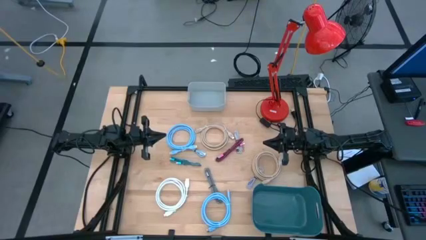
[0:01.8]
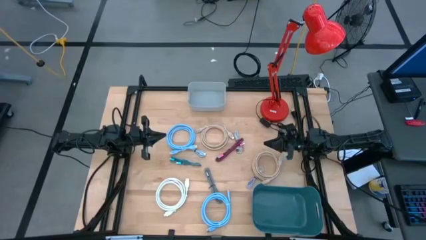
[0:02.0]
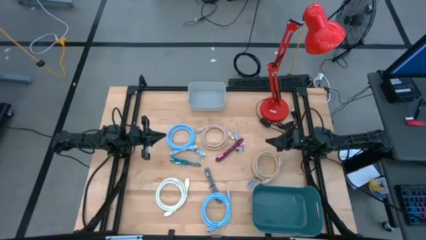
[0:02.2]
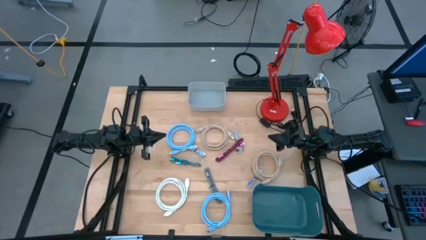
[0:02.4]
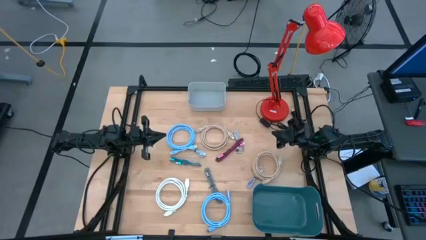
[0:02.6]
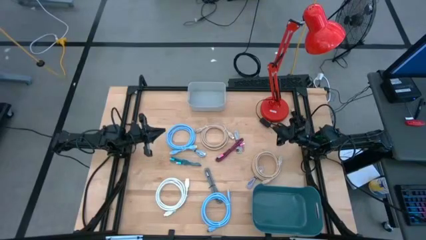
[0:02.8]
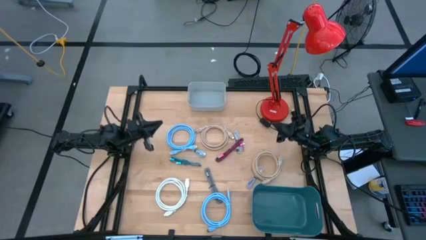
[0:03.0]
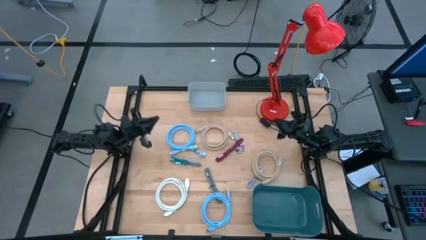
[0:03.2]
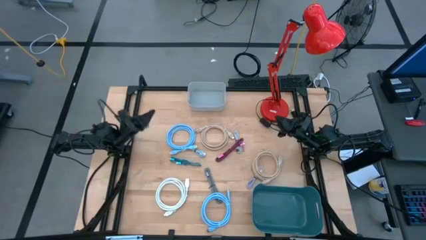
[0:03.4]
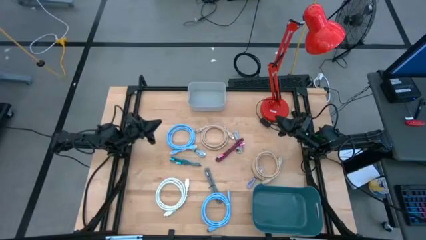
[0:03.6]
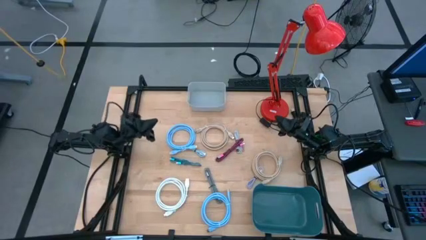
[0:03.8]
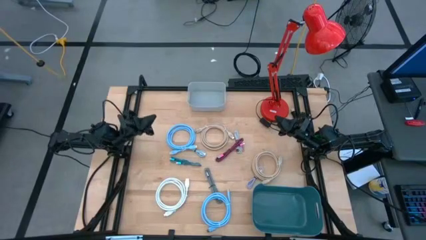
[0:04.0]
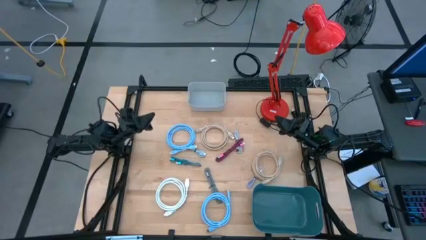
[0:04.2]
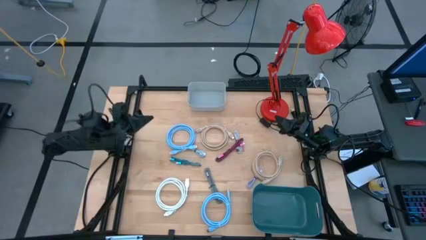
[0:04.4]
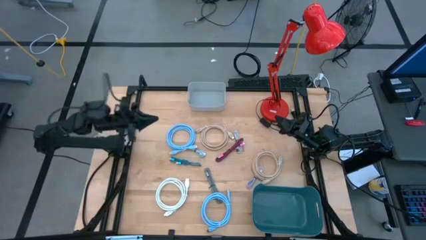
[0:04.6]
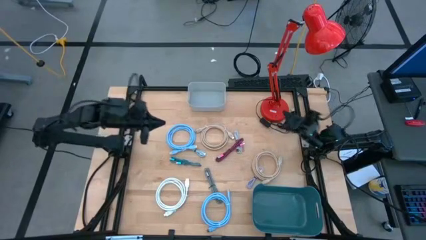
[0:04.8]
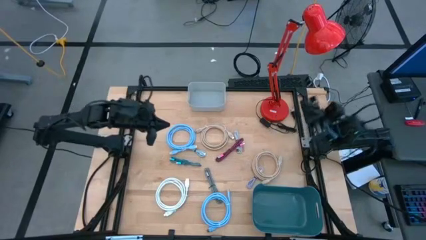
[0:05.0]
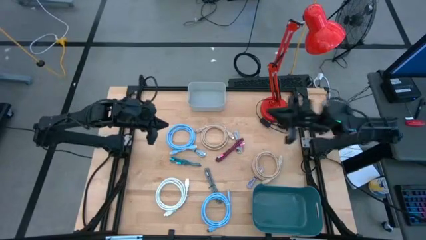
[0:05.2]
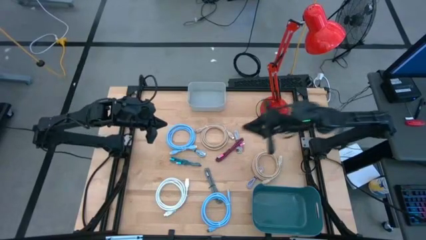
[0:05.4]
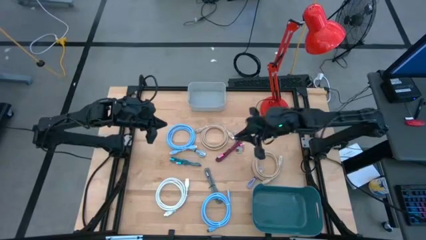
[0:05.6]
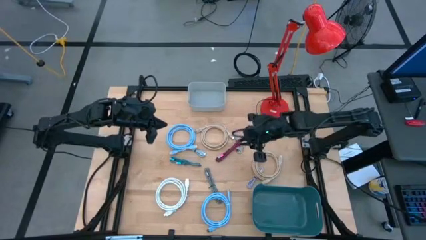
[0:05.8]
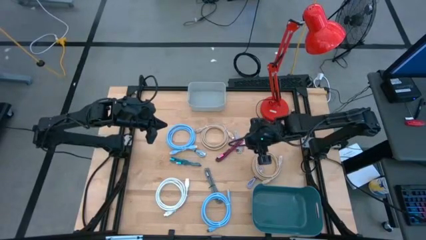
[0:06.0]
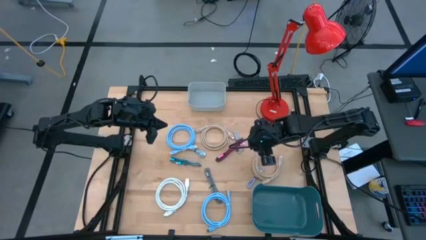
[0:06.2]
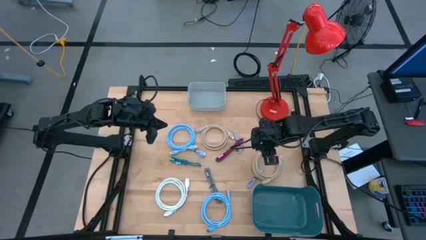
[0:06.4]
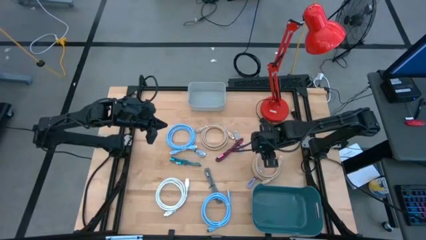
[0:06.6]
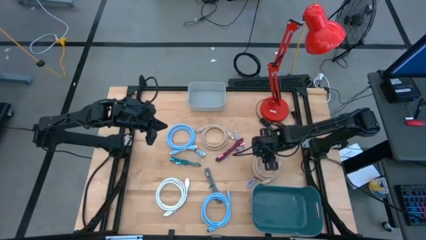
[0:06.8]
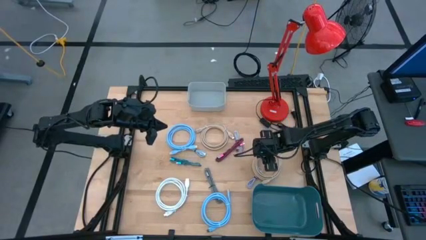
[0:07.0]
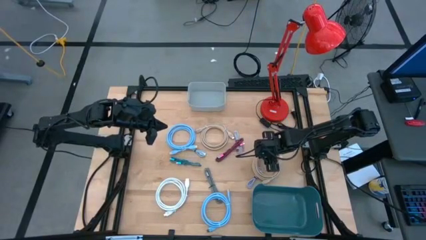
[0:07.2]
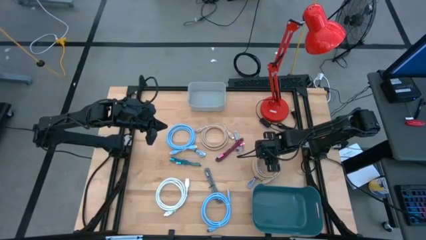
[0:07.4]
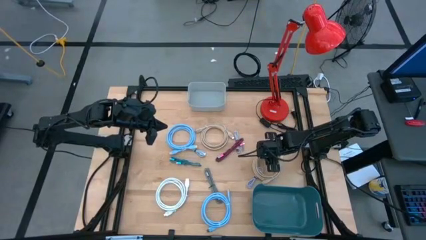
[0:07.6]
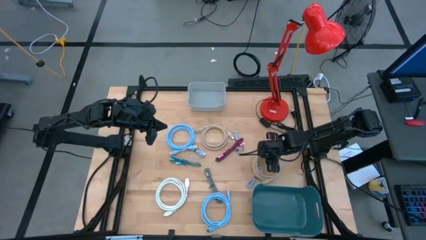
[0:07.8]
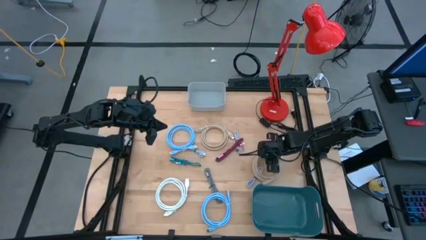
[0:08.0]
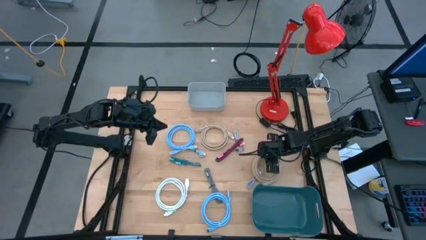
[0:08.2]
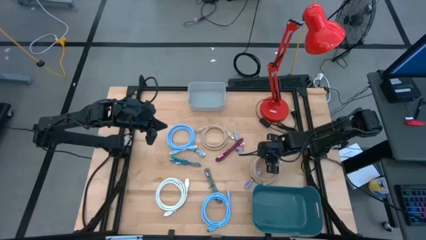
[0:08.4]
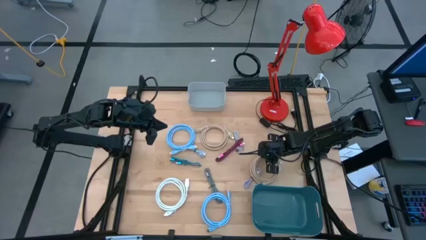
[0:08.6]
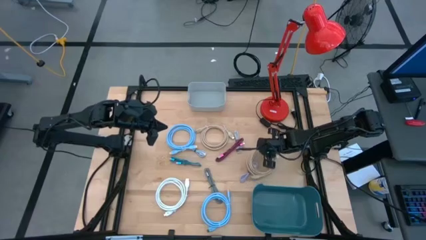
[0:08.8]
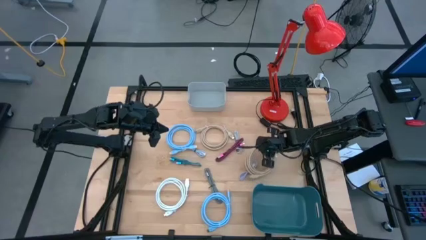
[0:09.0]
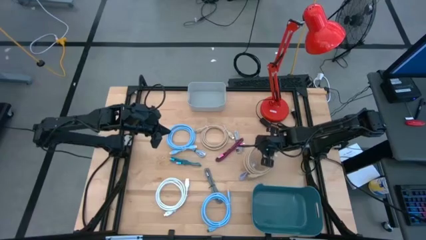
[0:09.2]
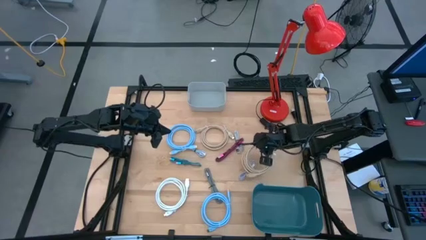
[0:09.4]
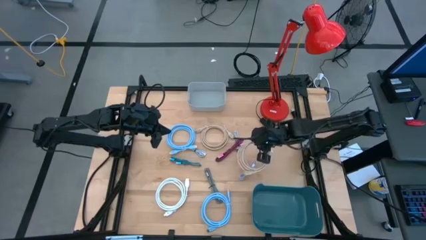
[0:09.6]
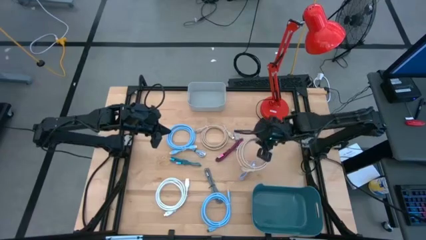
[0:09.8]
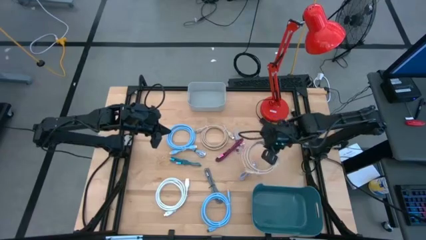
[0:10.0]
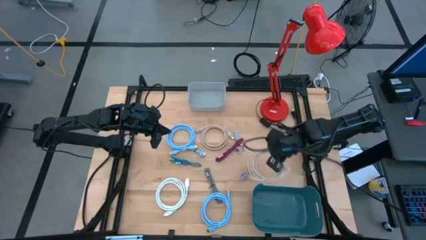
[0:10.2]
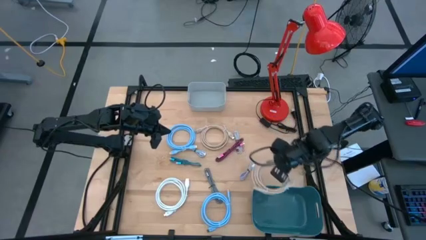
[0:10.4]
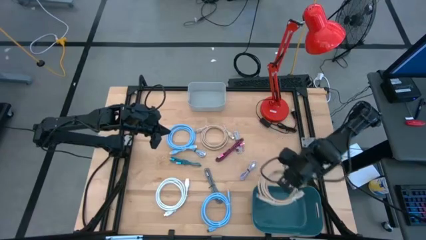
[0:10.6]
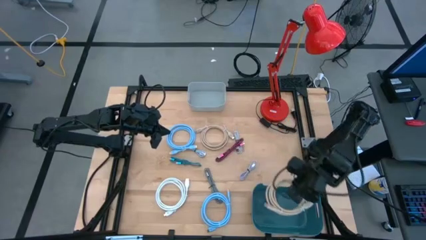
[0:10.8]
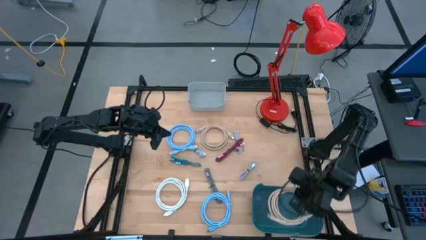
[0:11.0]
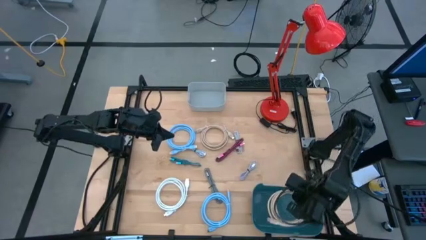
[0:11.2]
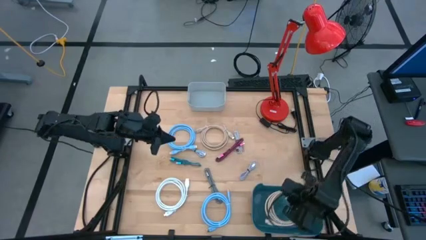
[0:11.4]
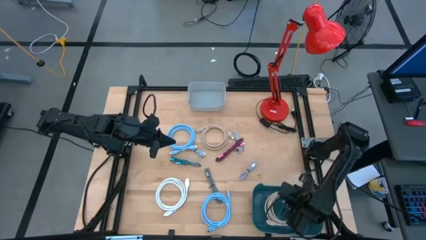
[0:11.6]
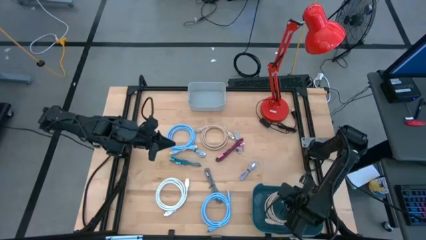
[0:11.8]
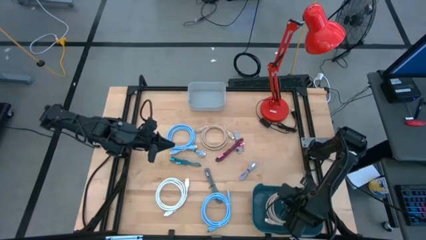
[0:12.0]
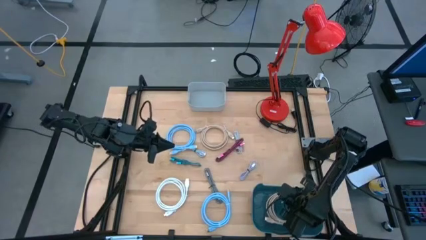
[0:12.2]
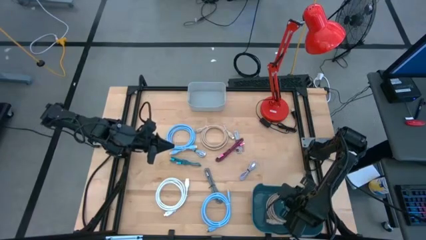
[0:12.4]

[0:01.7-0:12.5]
Task: Pick & Place USB Port
Put the brown hdmi cable into the blue bin

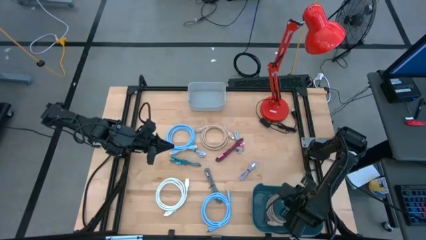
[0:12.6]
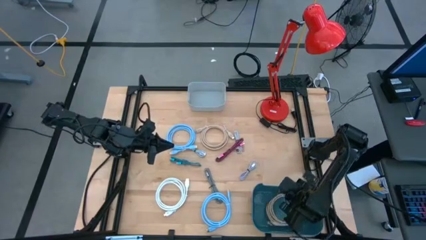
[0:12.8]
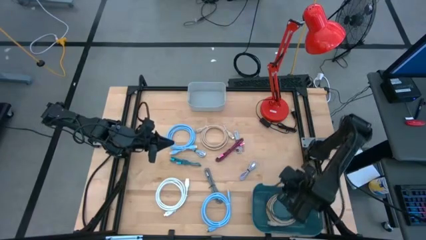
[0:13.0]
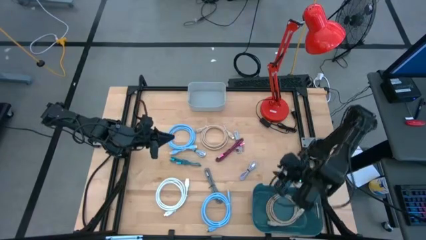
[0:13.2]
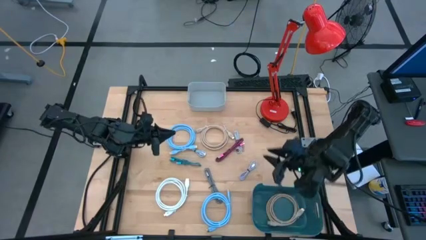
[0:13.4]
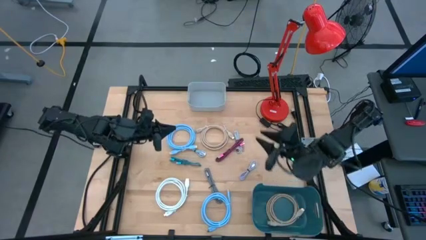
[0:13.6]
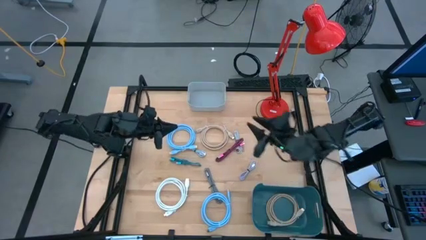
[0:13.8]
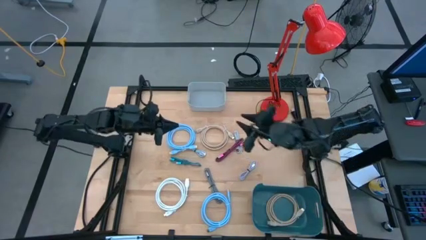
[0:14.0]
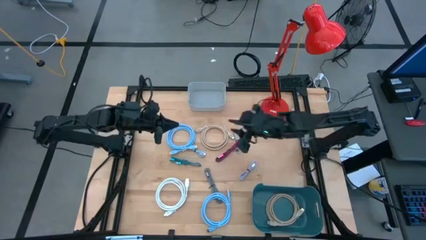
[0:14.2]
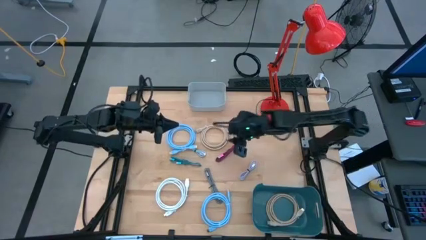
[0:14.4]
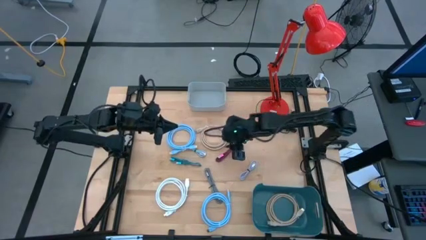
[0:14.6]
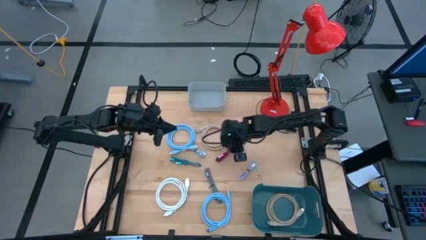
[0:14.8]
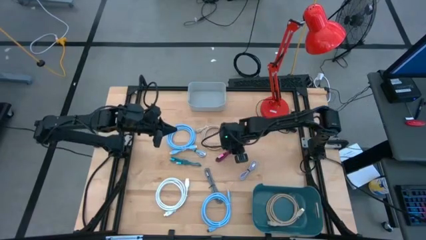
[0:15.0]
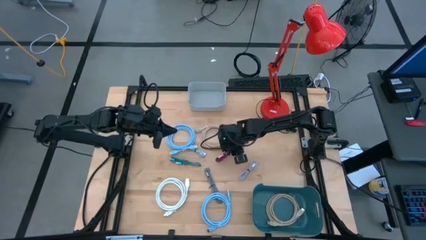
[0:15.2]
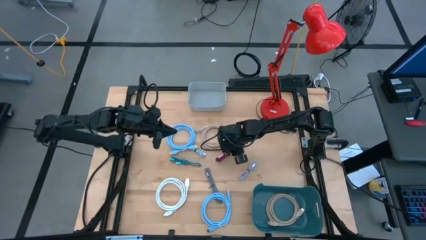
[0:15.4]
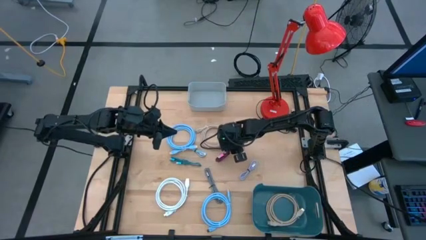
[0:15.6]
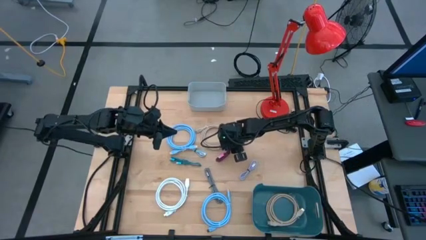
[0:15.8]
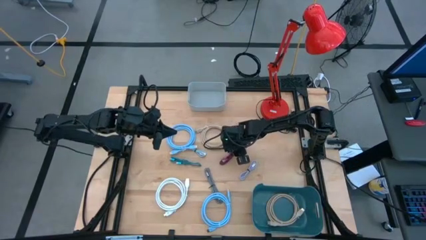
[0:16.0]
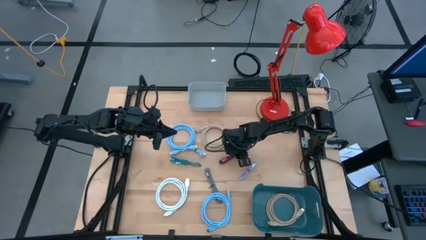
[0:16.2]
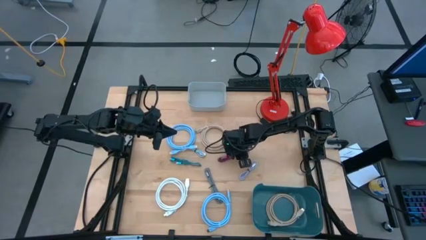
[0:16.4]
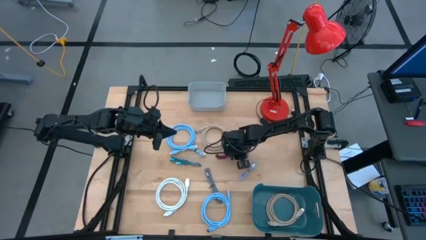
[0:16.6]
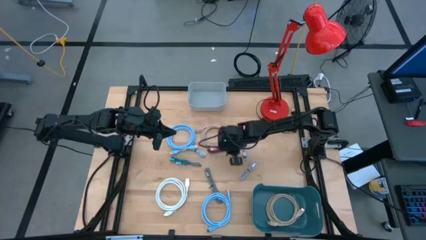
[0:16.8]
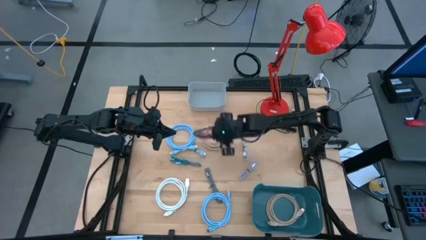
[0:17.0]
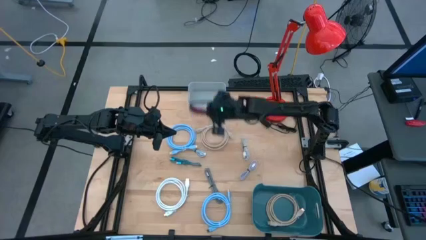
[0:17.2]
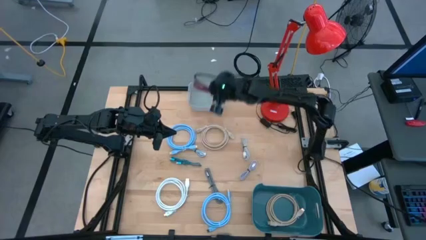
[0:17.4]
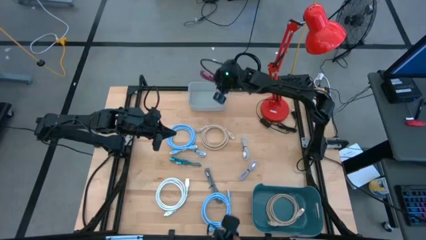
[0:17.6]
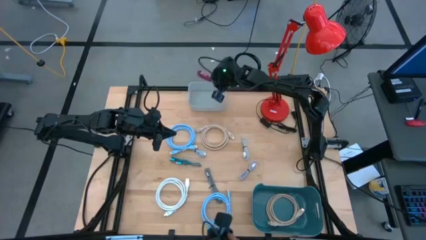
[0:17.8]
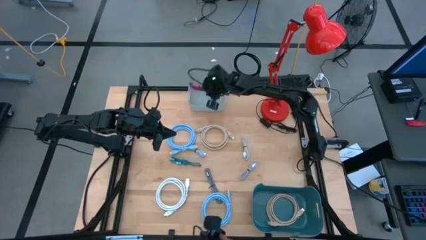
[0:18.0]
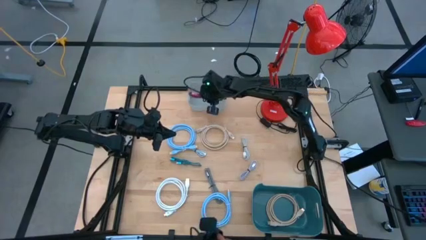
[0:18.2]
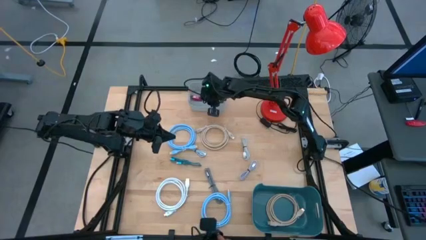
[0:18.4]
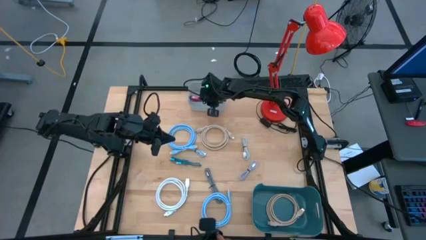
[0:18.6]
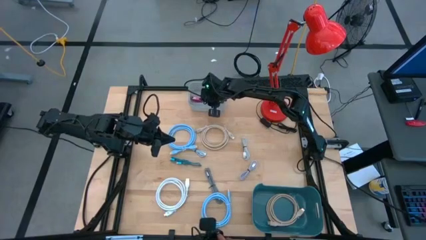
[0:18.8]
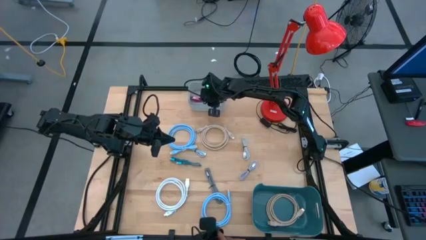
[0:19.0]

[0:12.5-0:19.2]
Put the the pink usb cable into the gray bin
